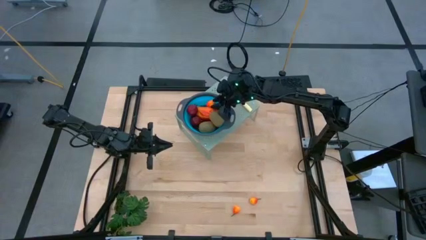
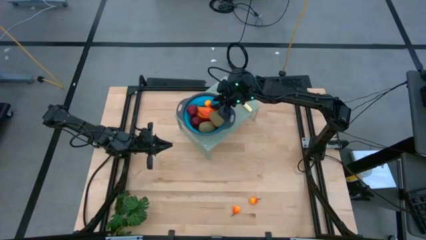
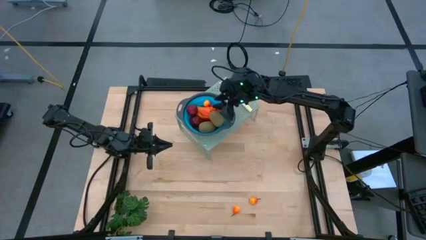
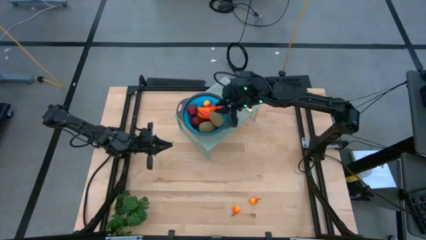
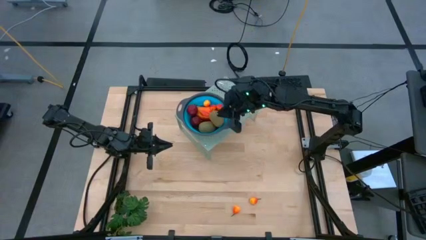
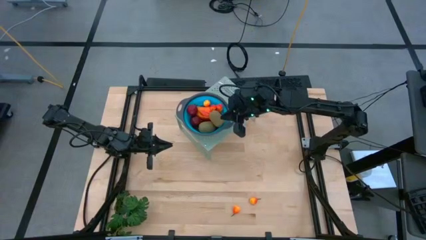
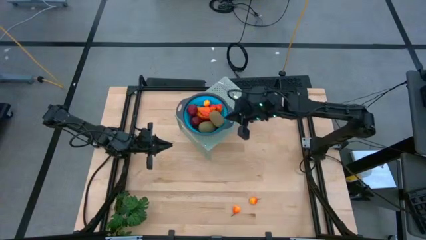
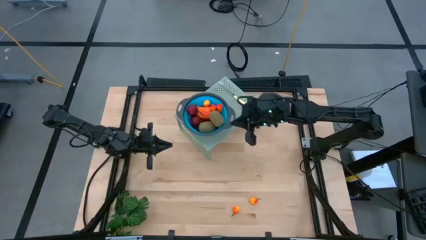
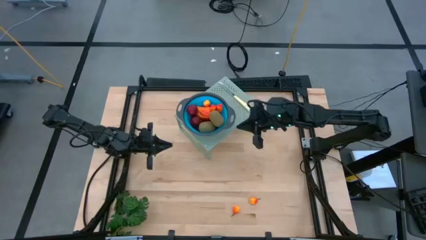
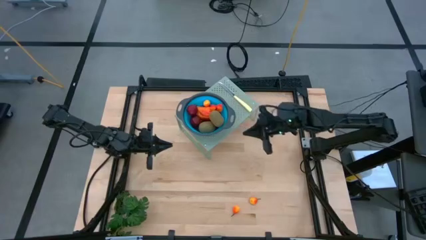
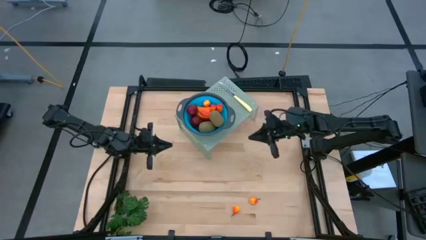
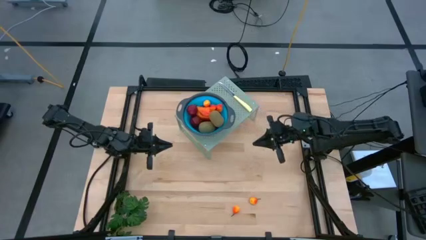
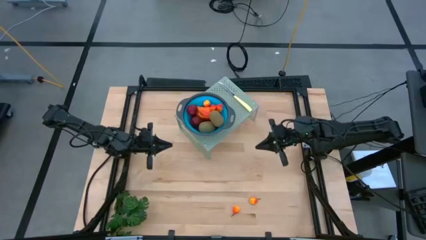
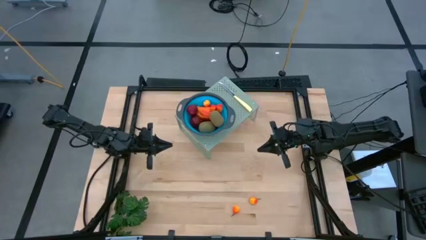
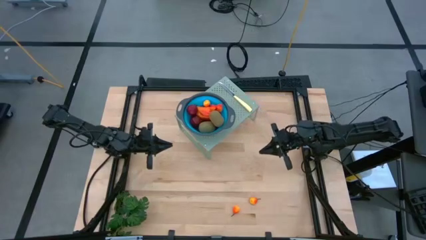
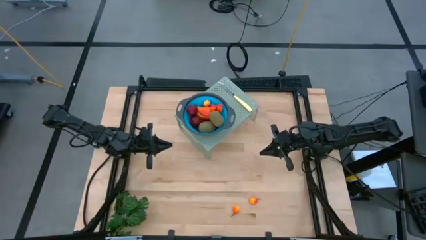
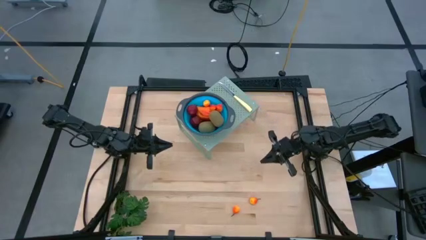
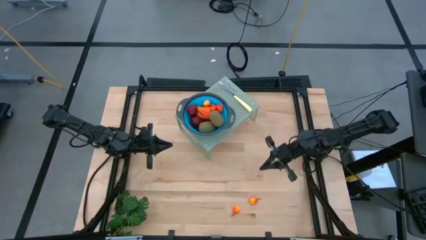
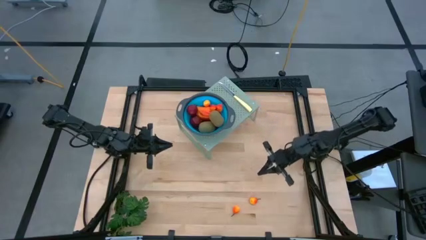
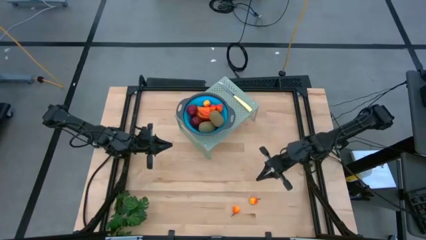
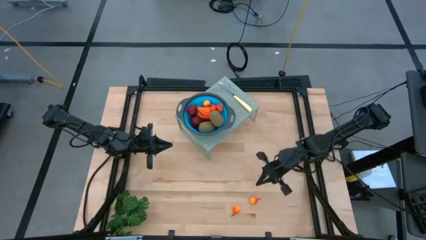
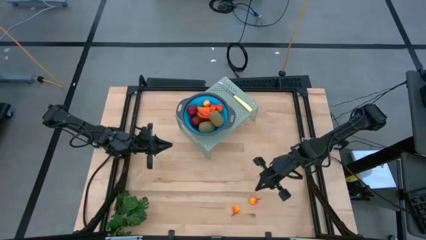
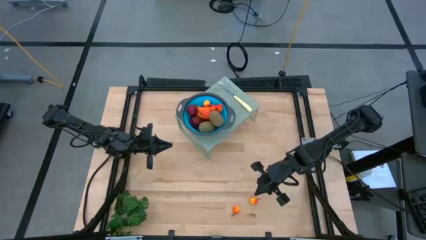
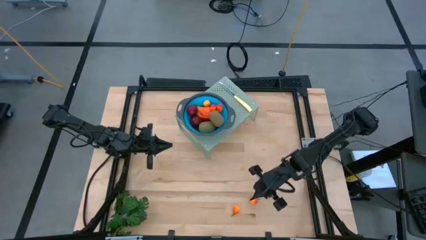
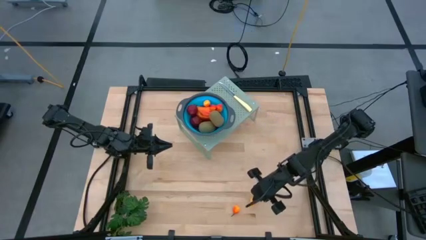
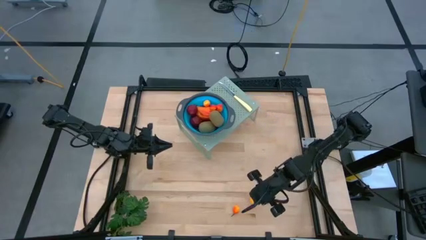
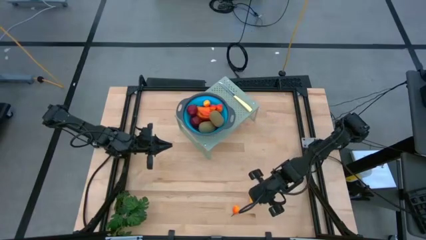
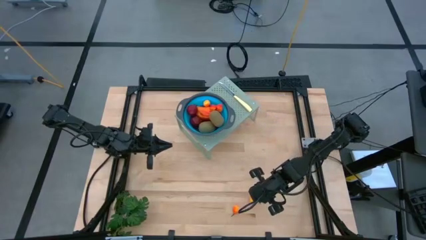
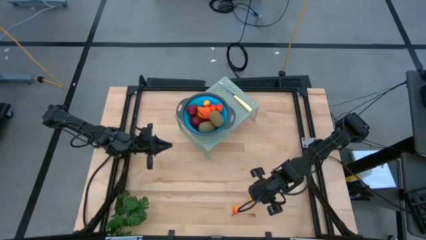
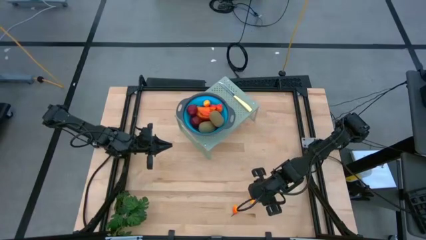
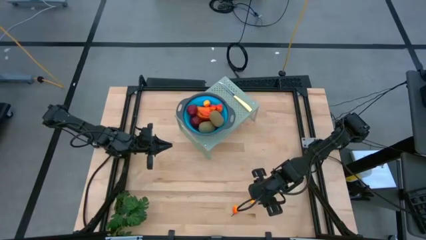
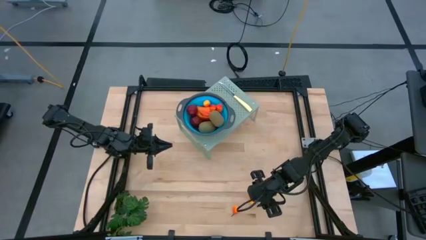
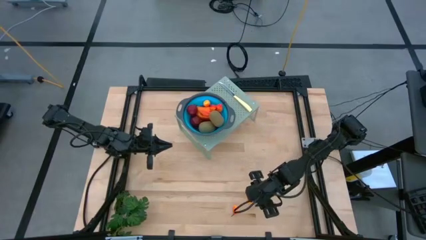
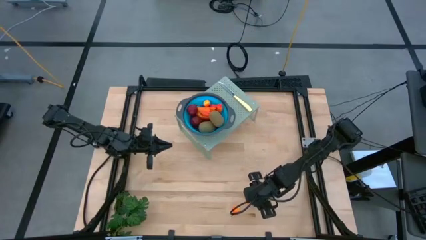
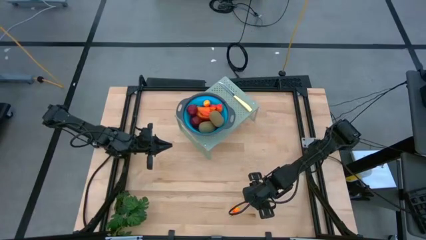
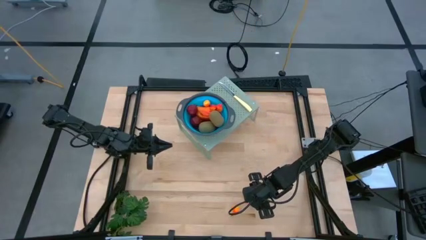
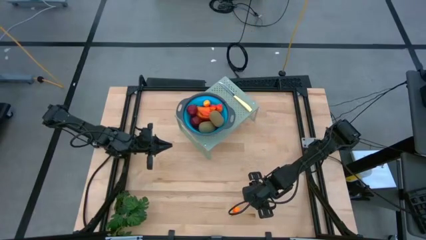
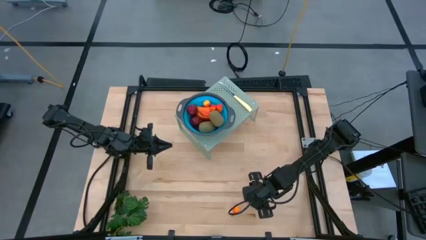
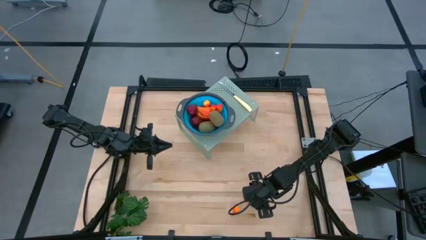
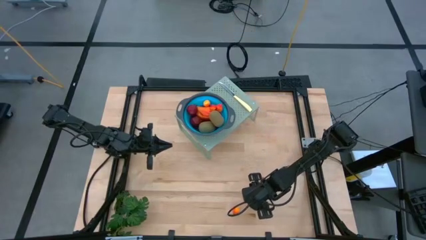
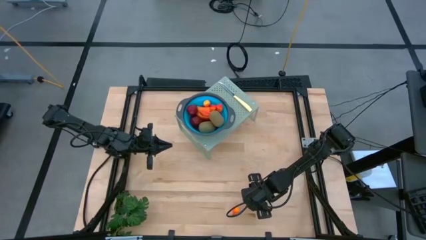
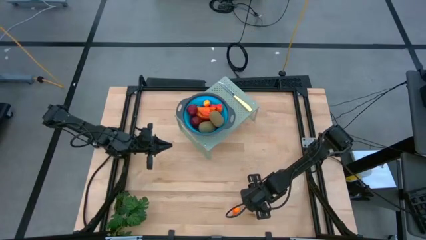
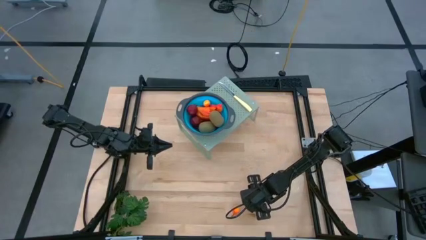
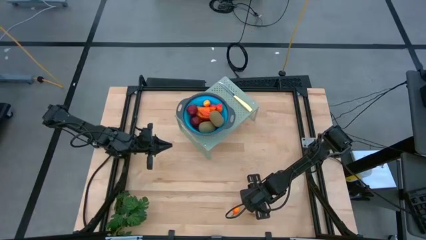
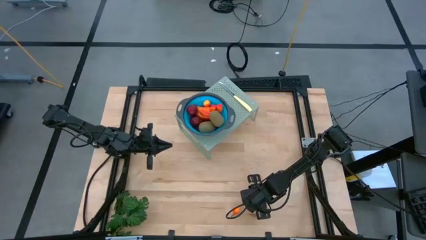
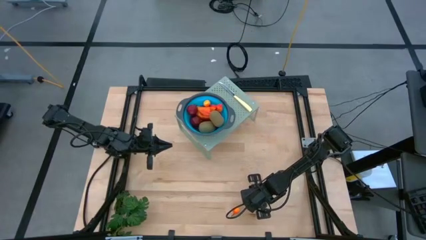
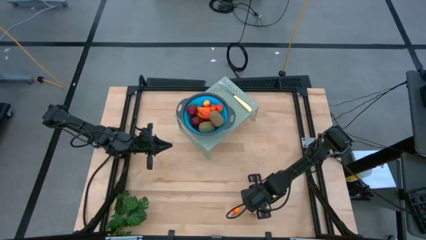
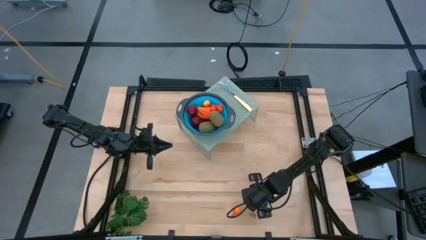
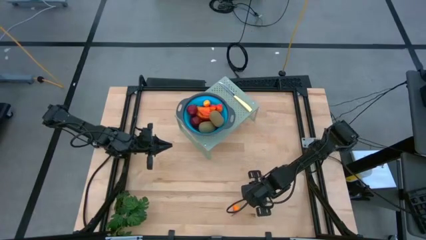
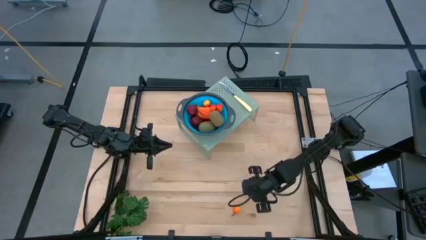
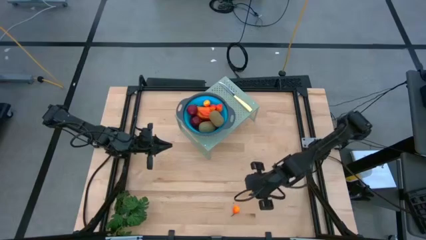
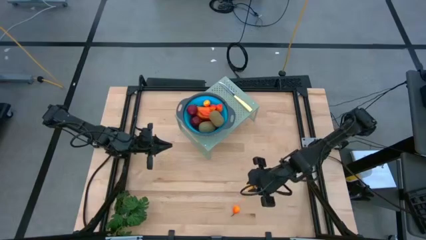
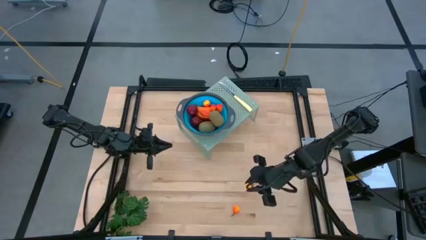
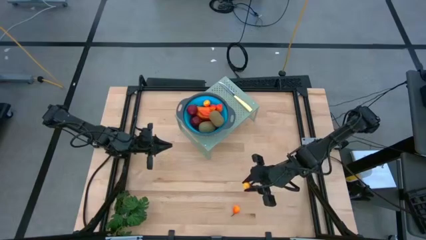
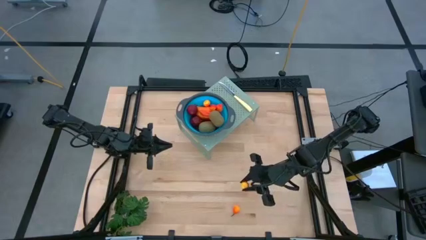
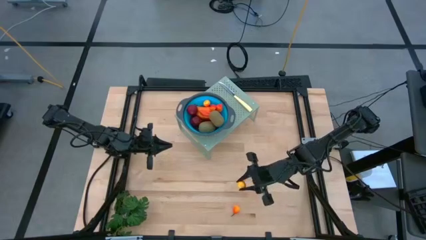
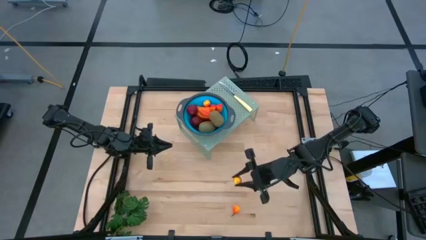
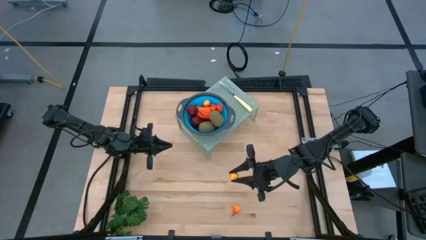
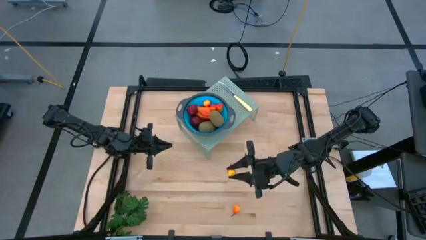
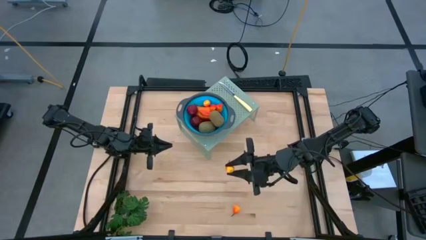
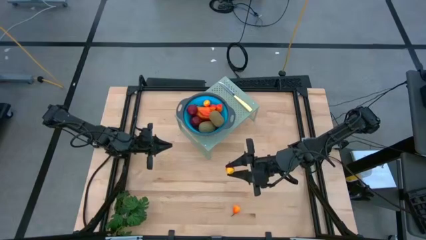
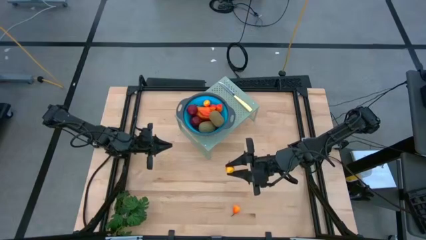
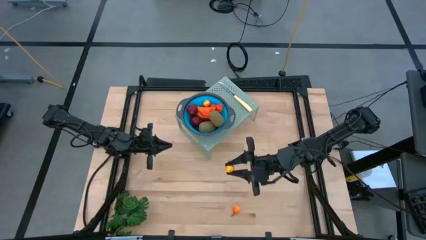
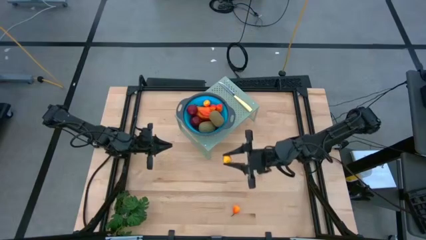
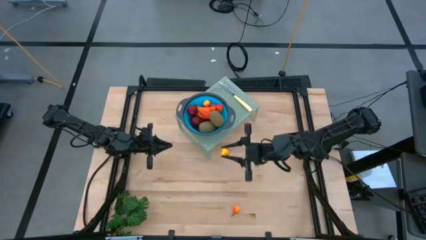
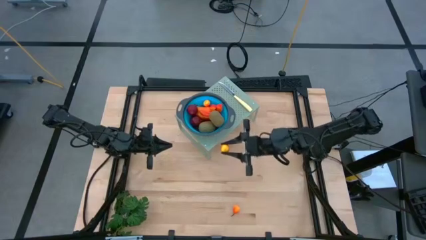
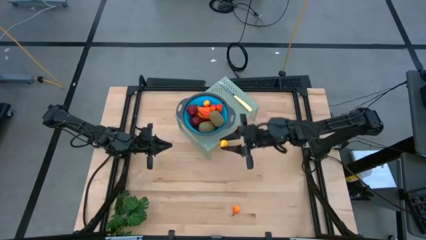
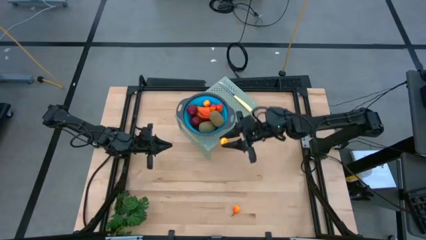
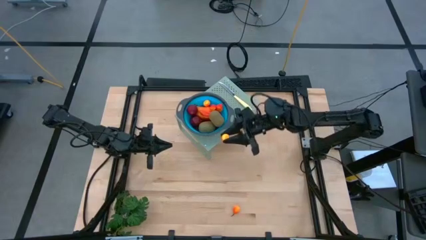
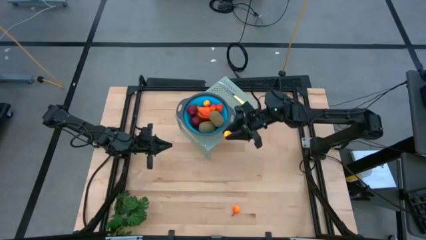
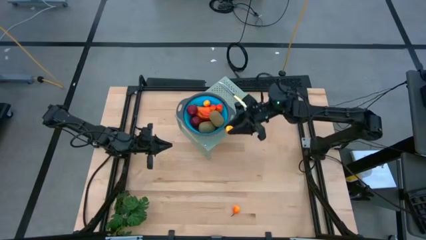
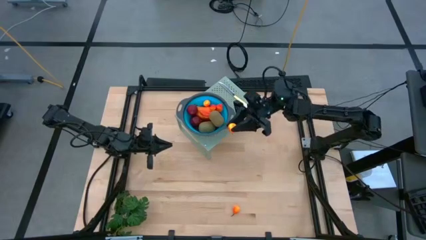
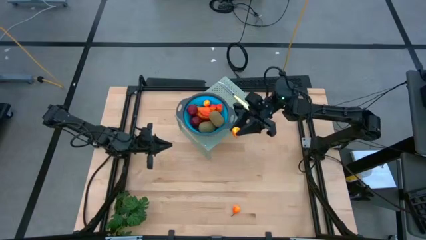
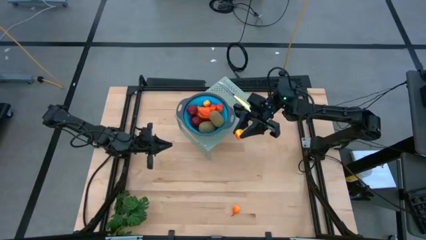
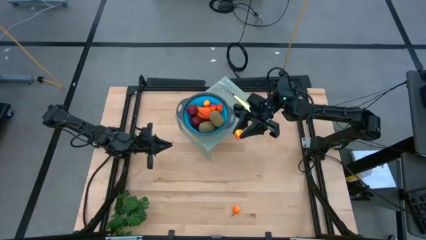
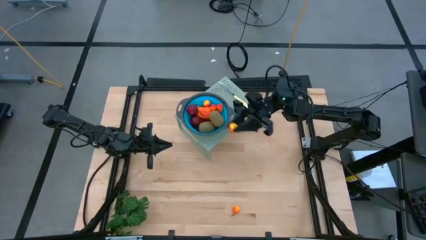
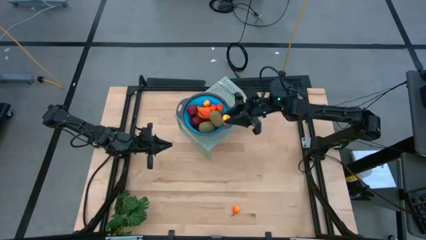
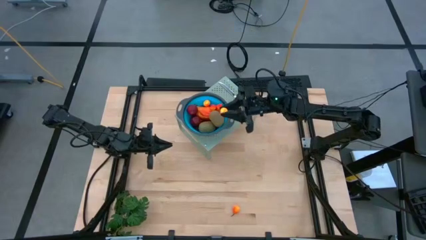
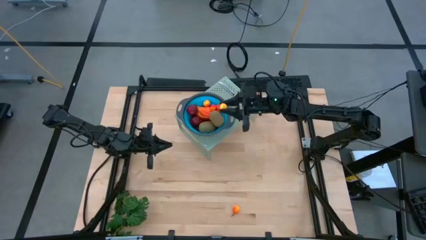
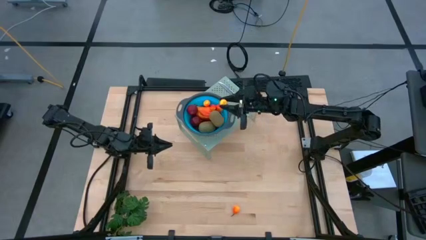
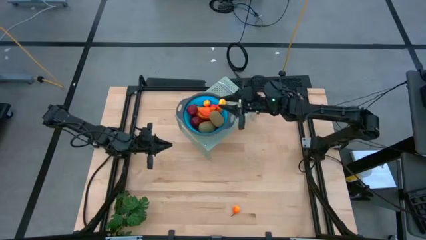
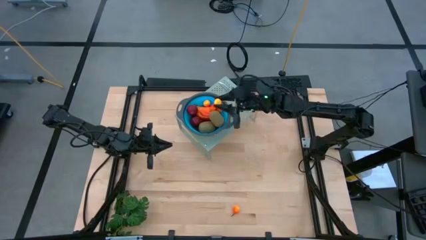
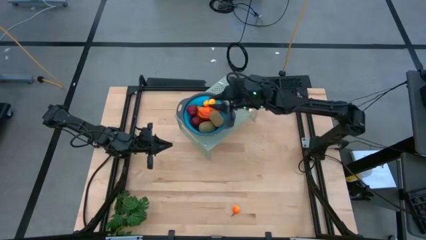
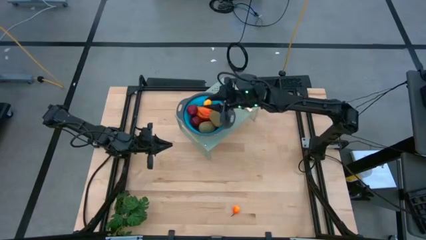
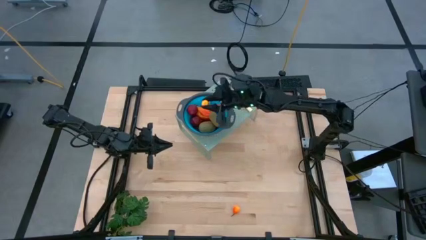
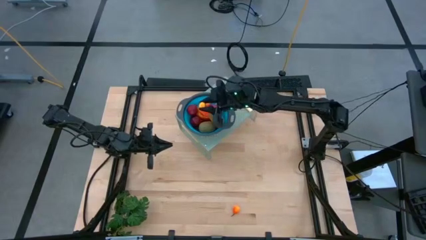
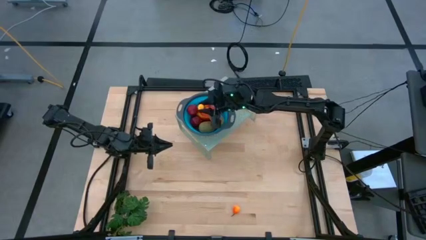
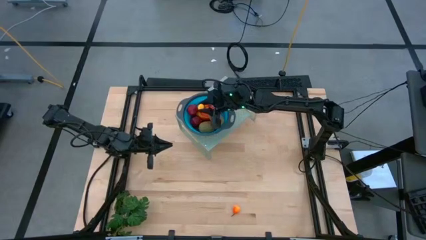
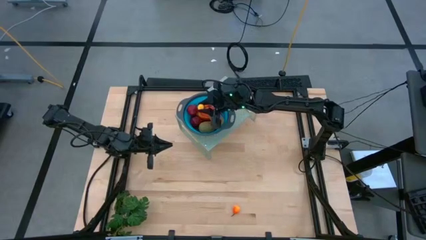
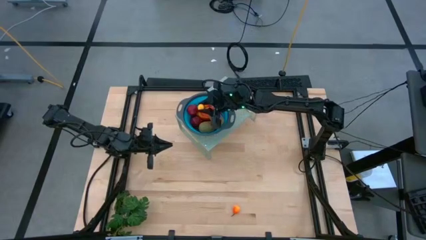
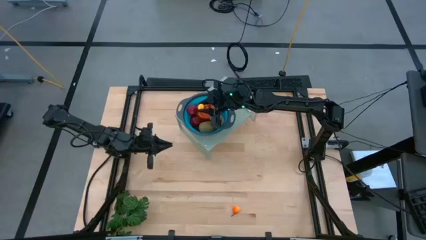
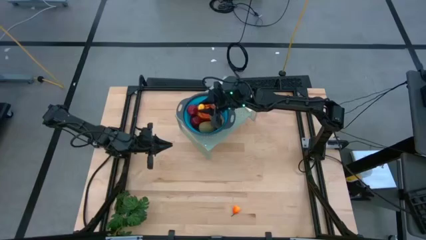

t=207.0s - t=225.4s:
Task: Pick & Place Fruit
Put the peach into the collapsible colander on the shelf
